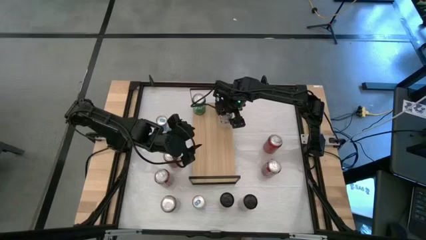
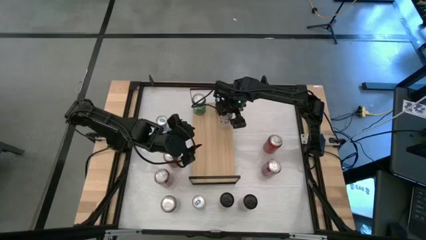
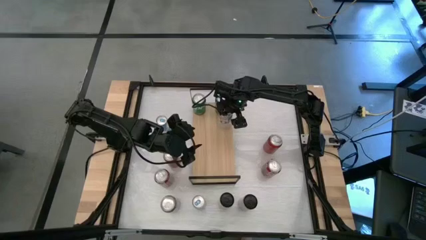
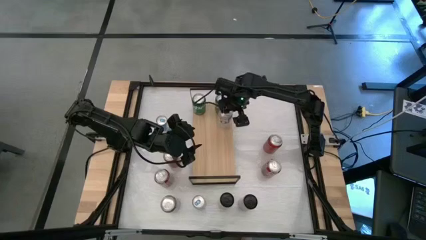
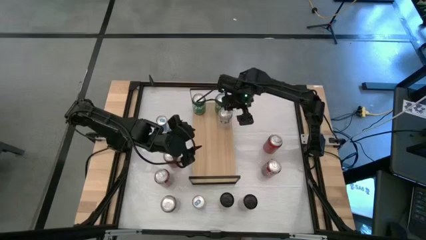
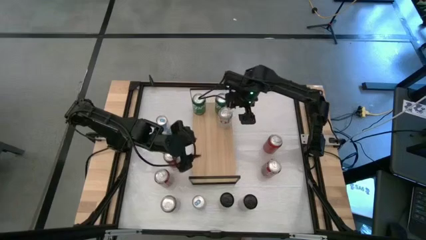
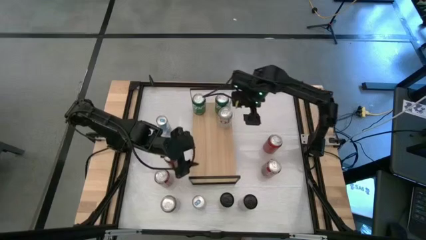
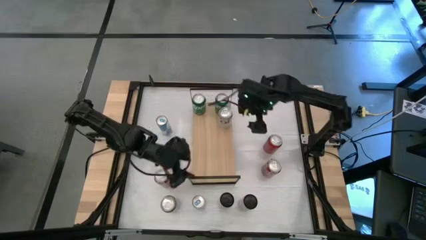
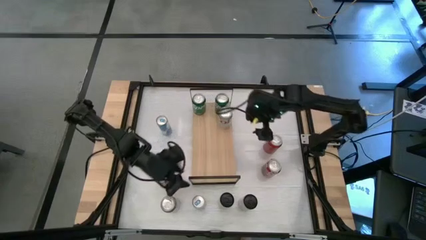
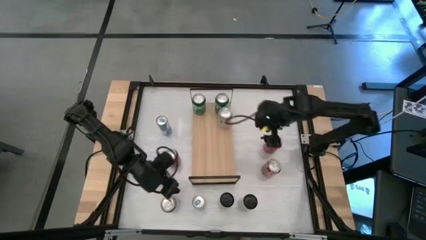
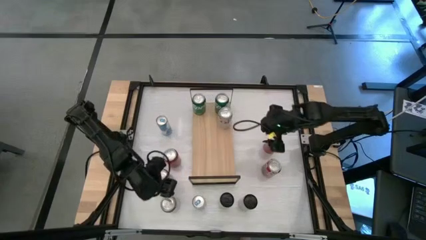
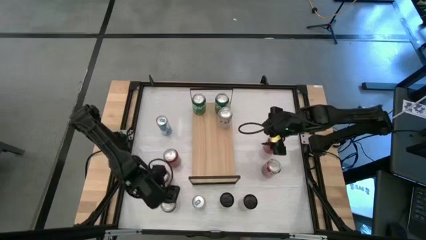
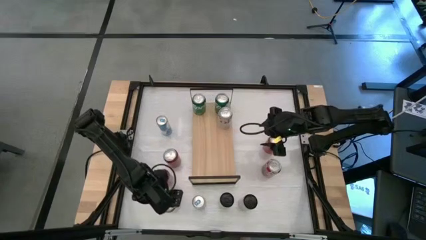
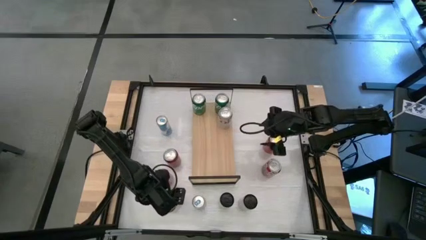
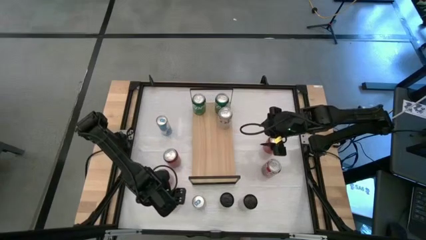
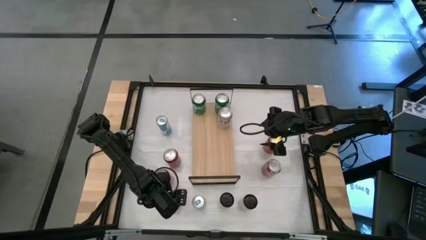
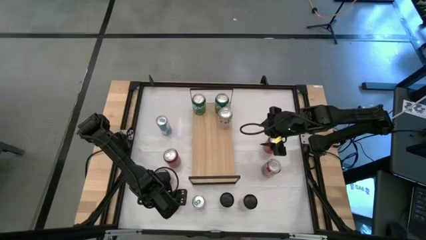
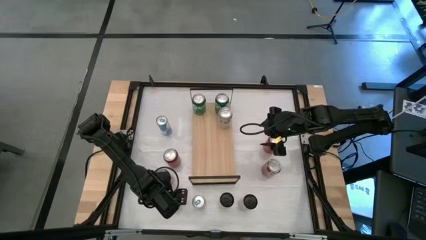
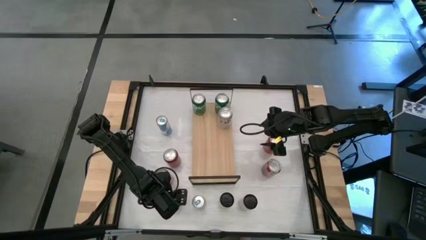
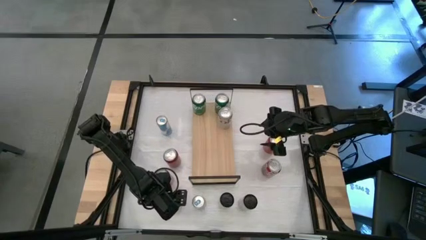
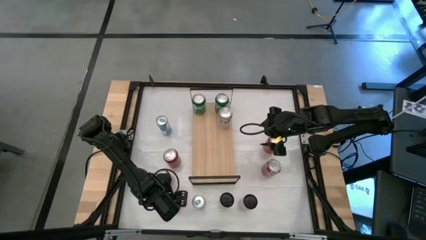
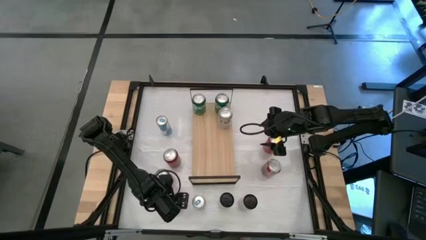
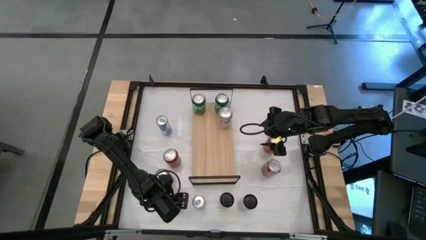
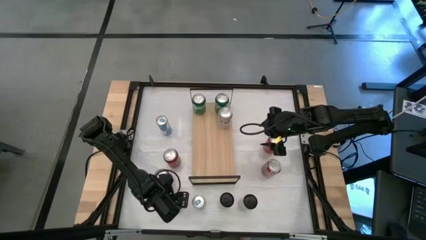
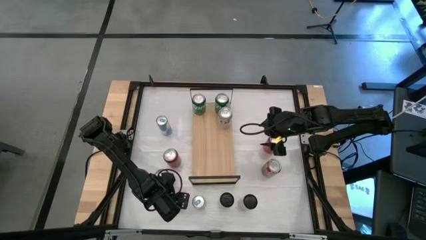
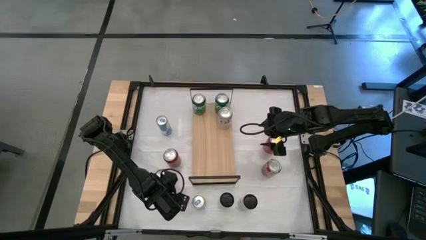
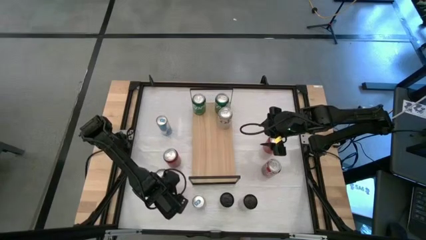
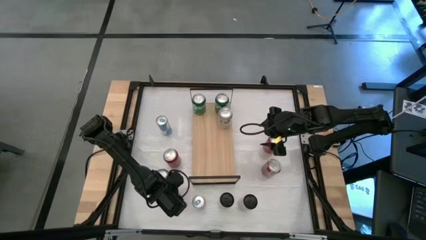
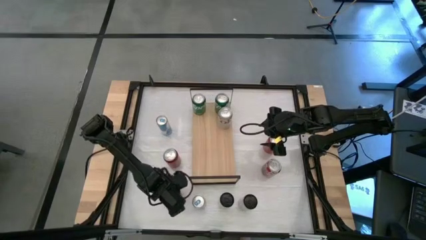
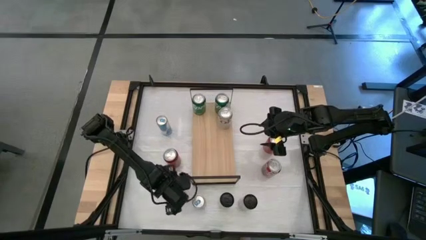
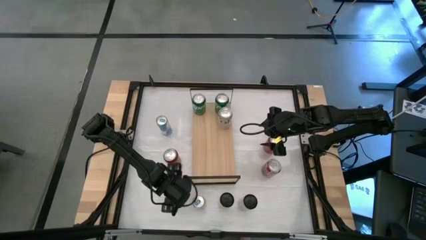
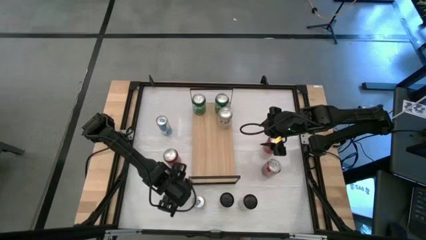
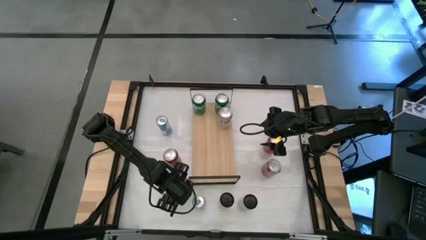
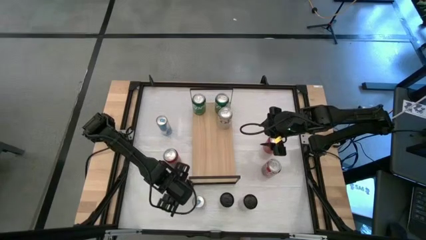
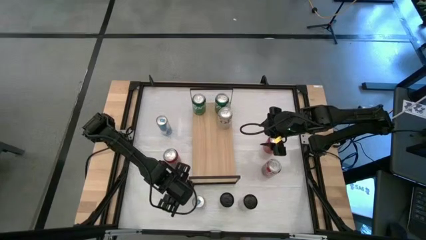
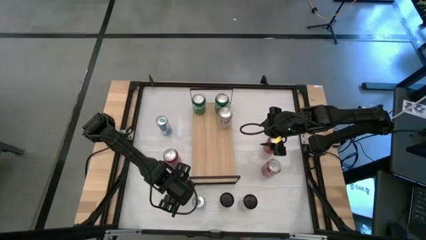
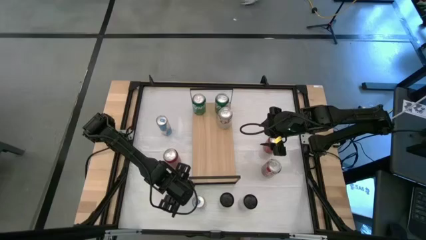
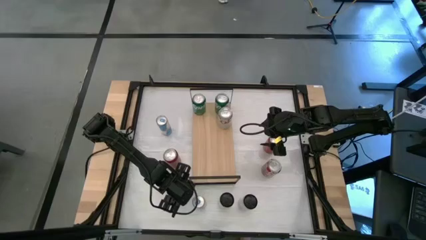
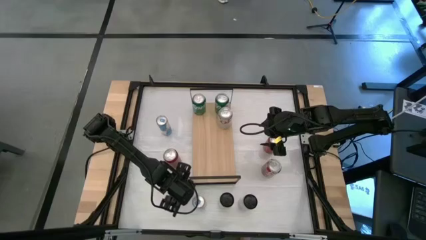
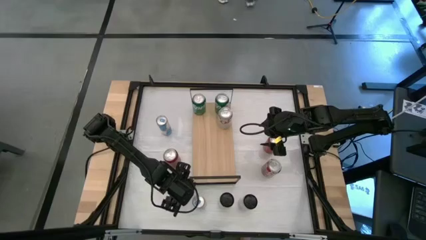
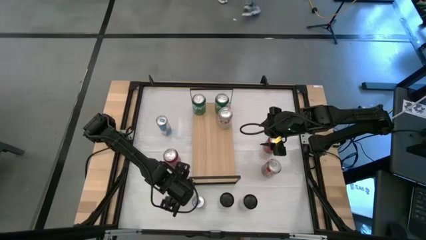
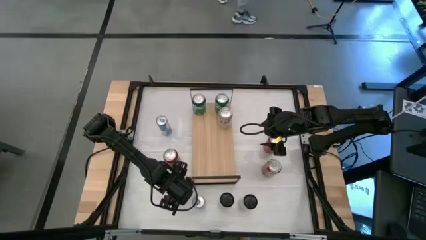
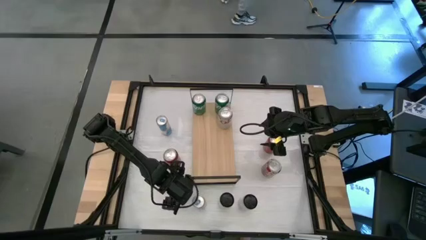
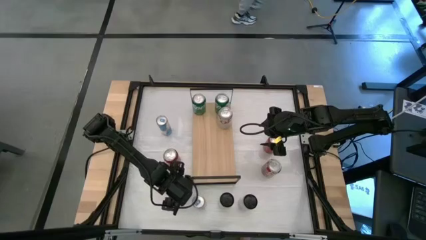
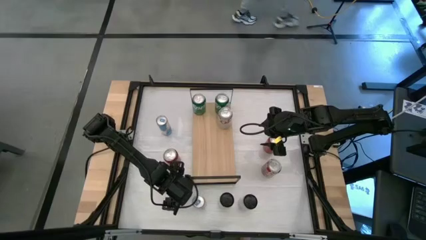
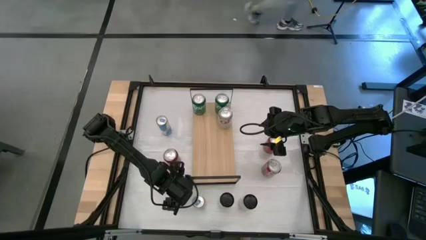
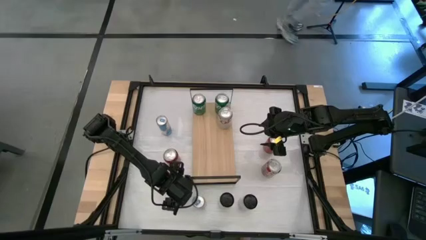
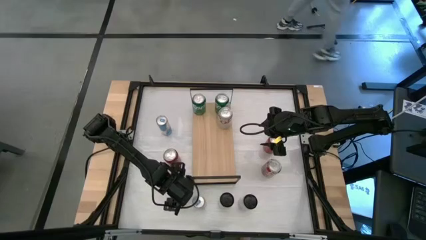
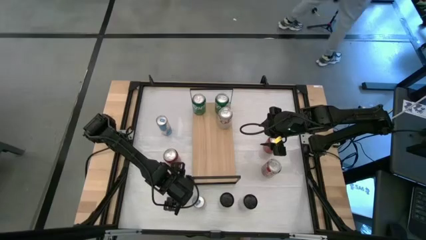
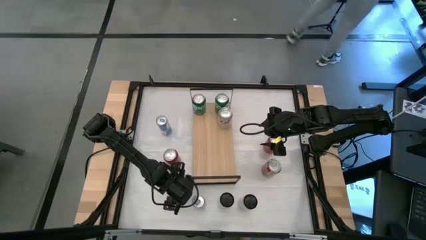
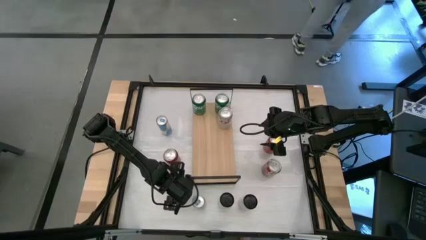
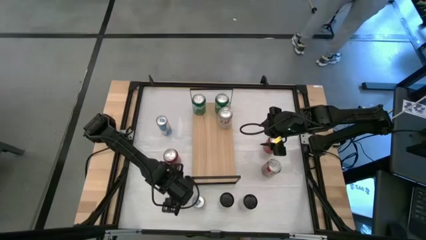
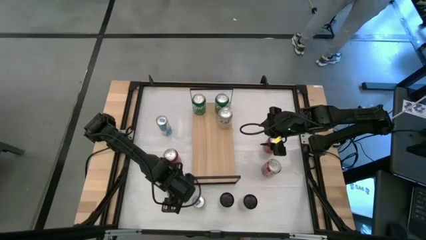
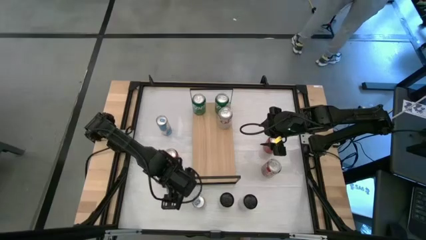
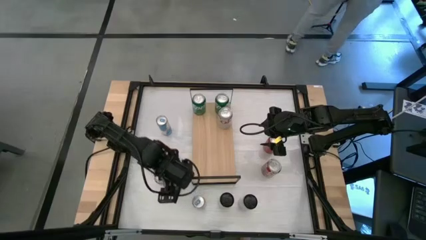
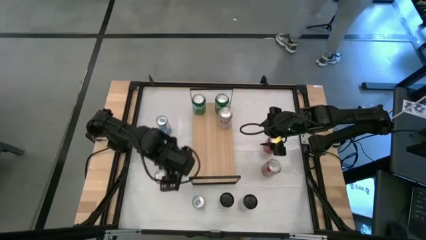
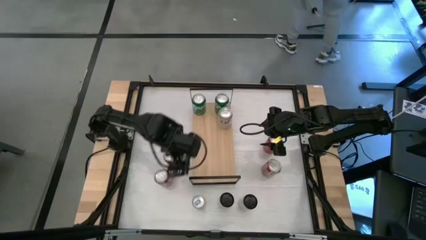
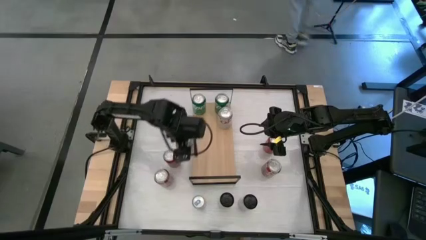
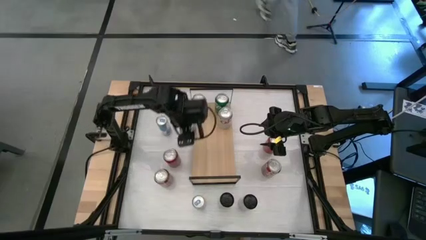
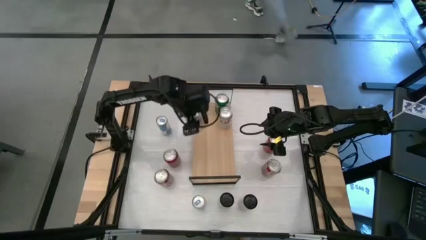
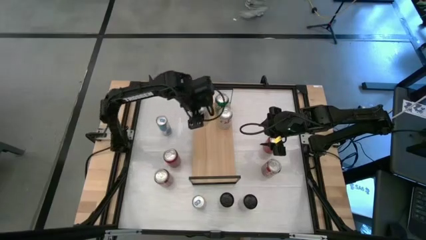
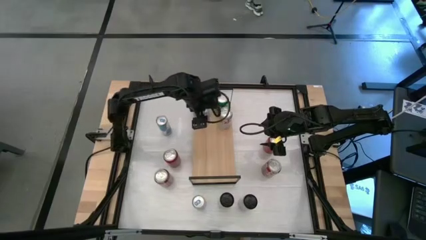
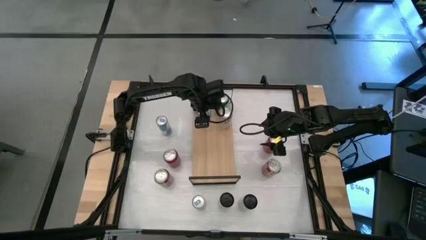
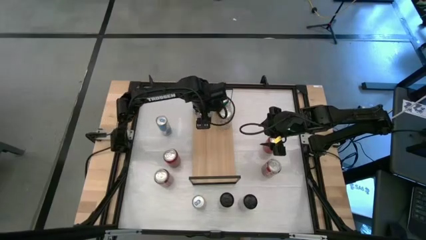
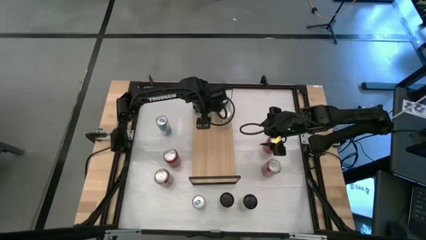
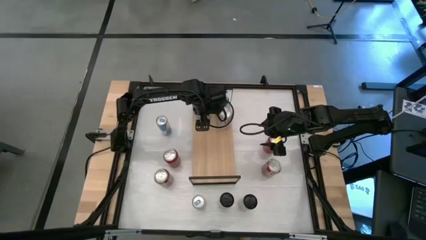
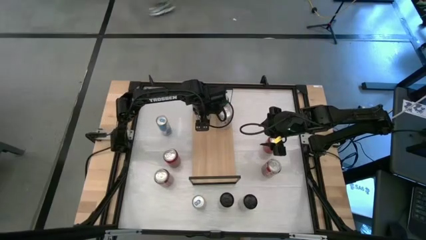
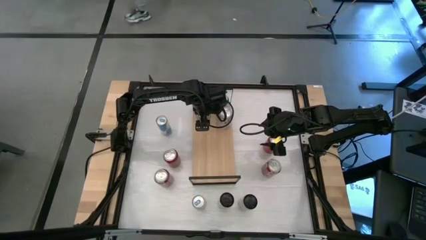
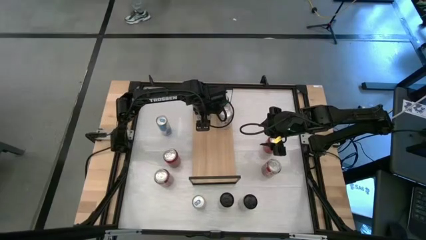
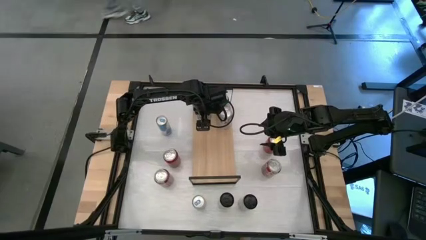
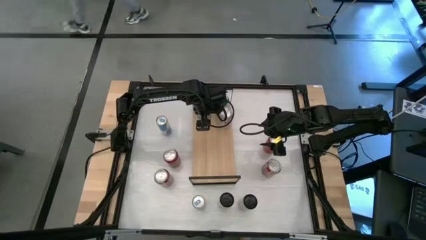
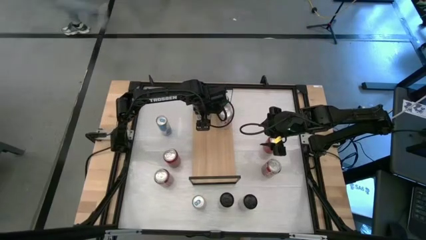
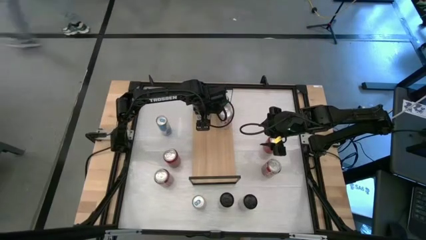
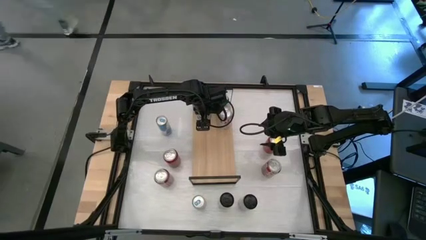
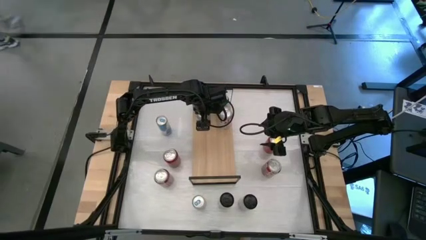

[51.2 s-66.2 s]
Task: Place canned beverage on shelf
Put the silver soda can on the shelf aligned with the other silver soda can
